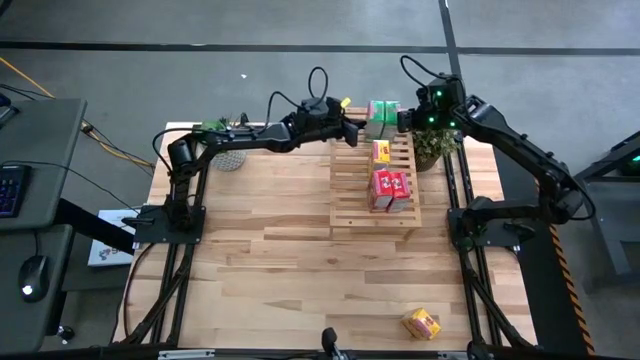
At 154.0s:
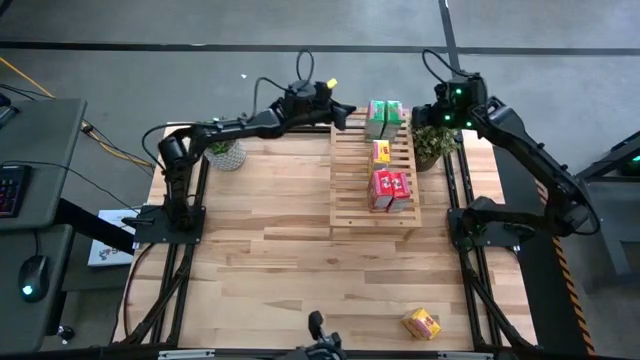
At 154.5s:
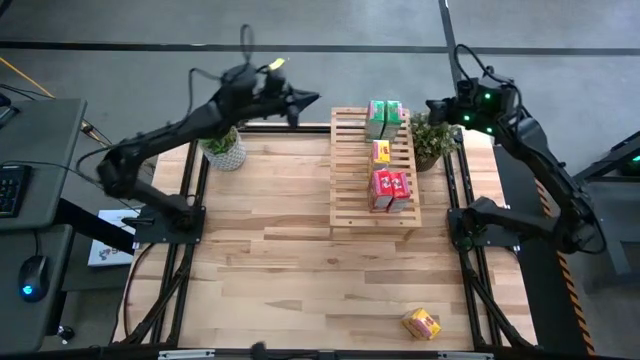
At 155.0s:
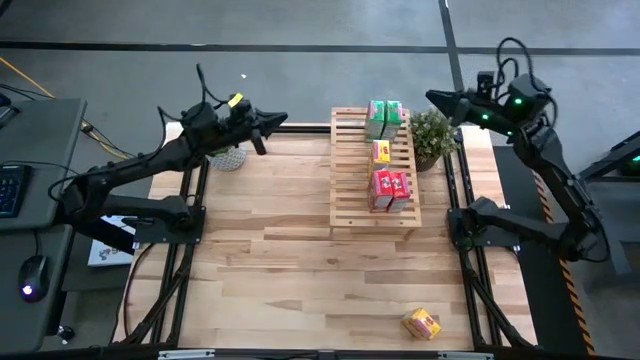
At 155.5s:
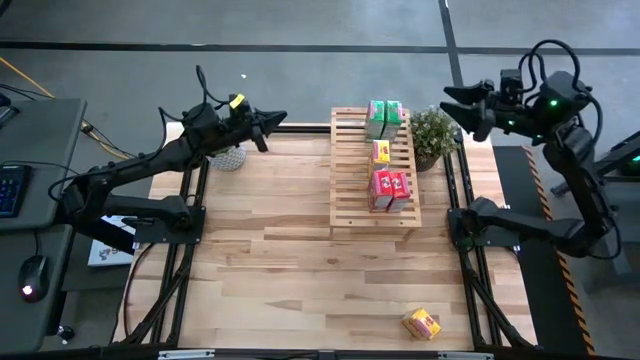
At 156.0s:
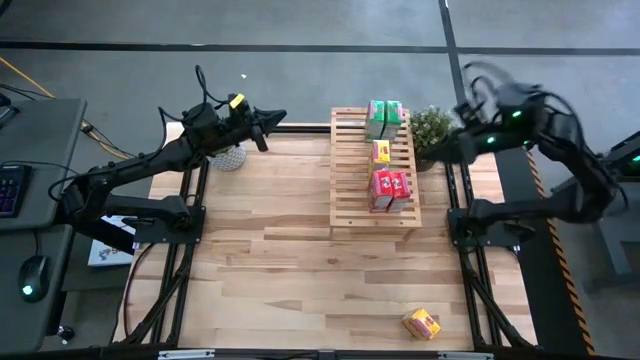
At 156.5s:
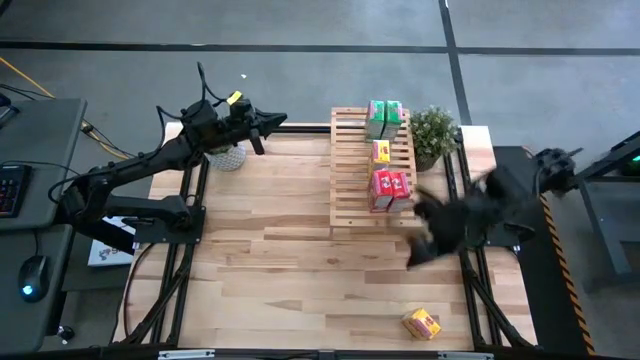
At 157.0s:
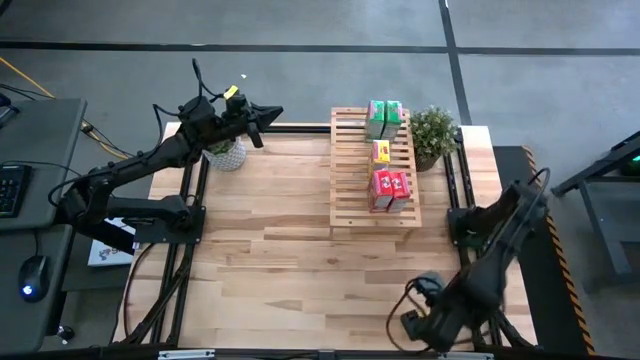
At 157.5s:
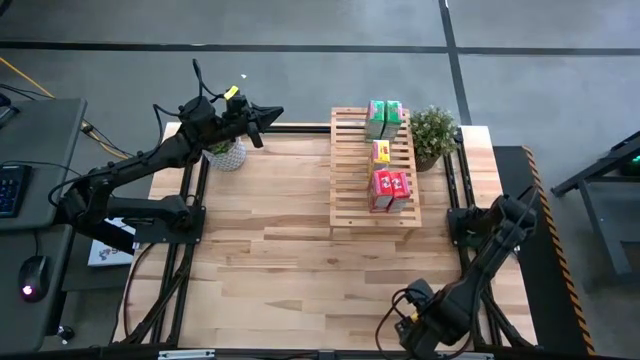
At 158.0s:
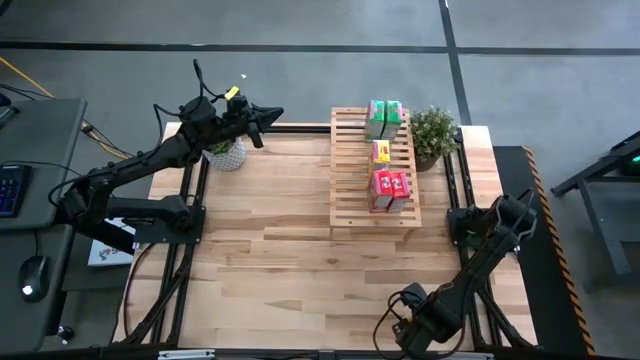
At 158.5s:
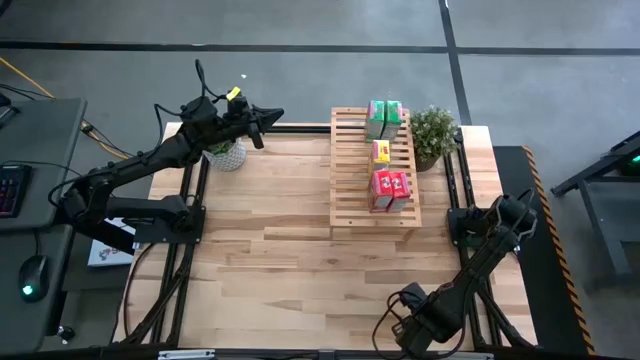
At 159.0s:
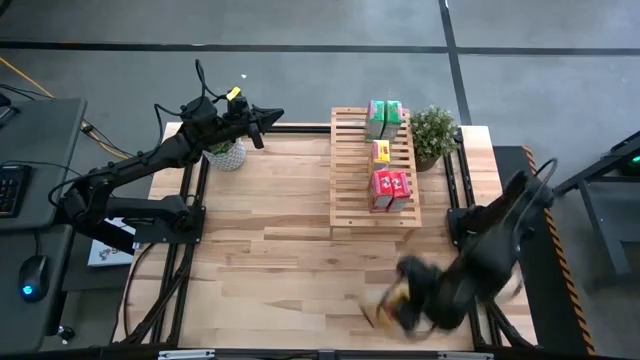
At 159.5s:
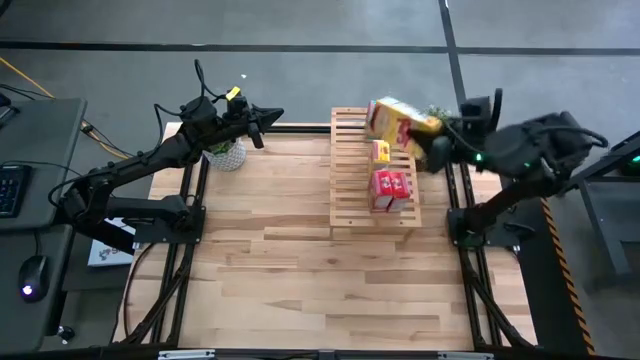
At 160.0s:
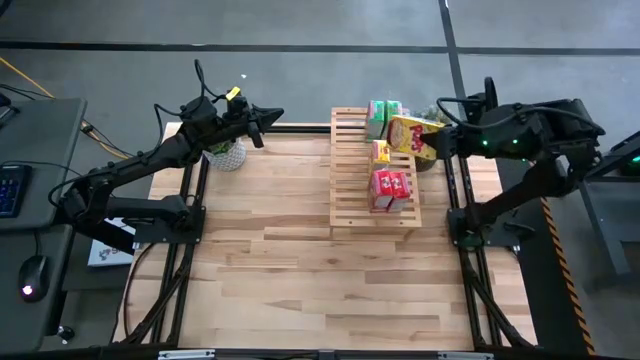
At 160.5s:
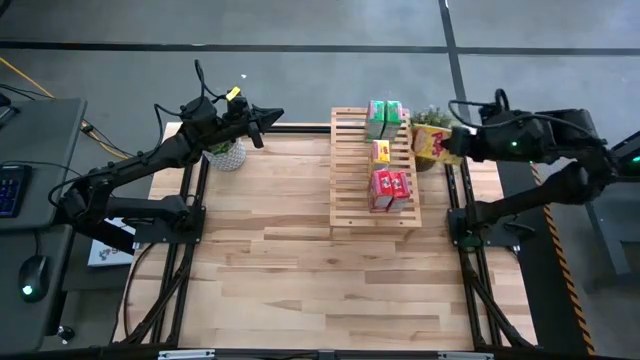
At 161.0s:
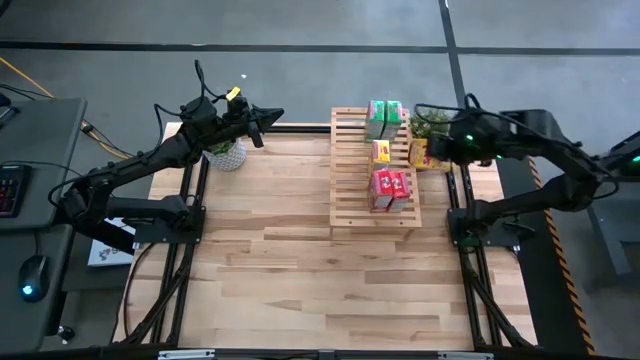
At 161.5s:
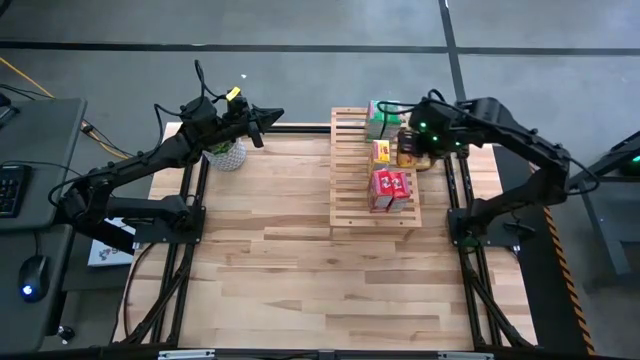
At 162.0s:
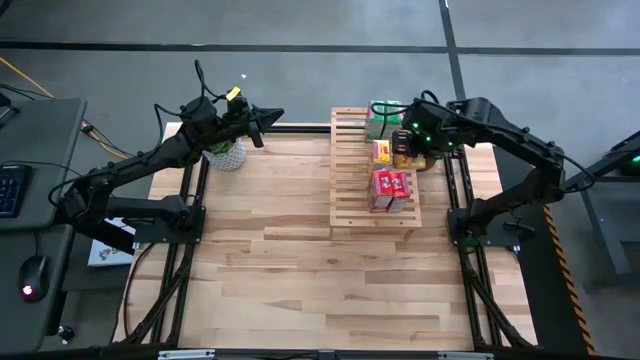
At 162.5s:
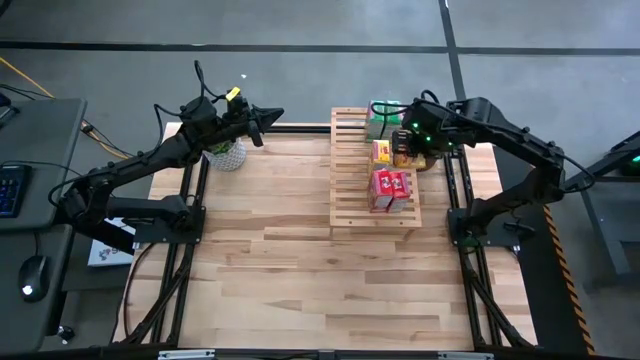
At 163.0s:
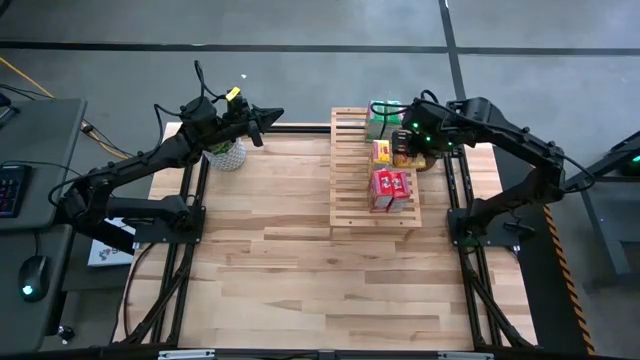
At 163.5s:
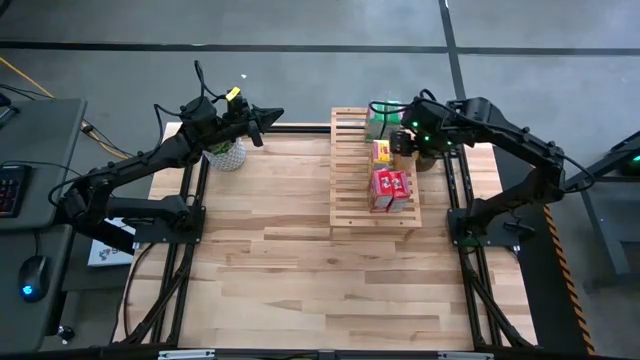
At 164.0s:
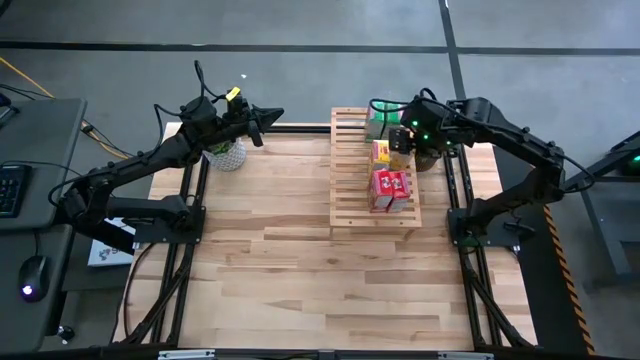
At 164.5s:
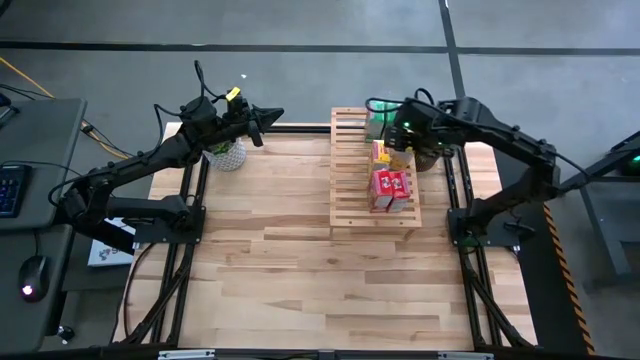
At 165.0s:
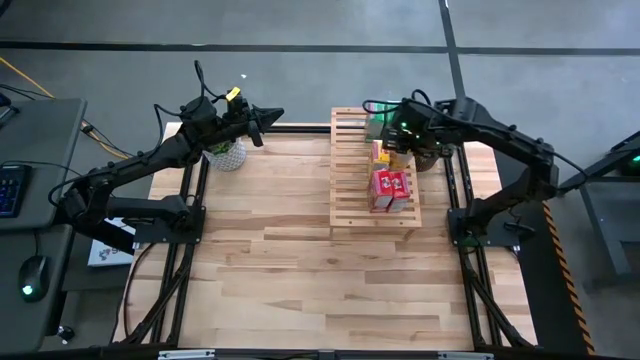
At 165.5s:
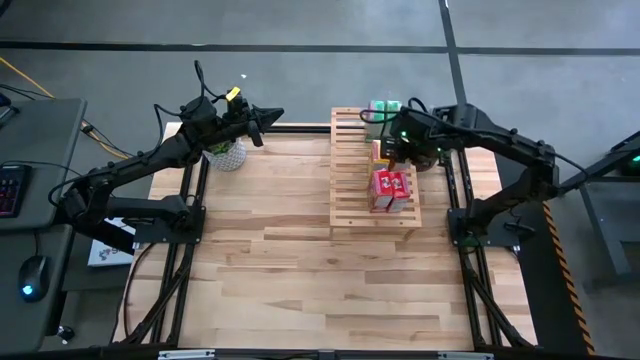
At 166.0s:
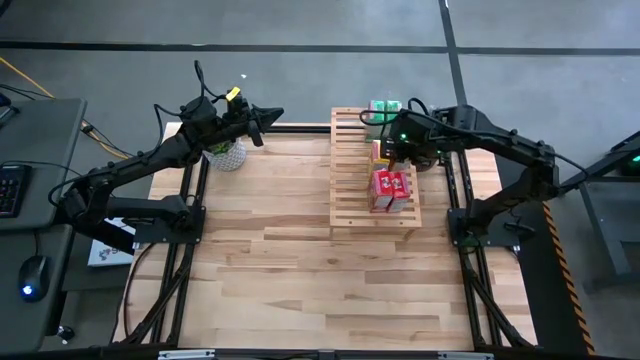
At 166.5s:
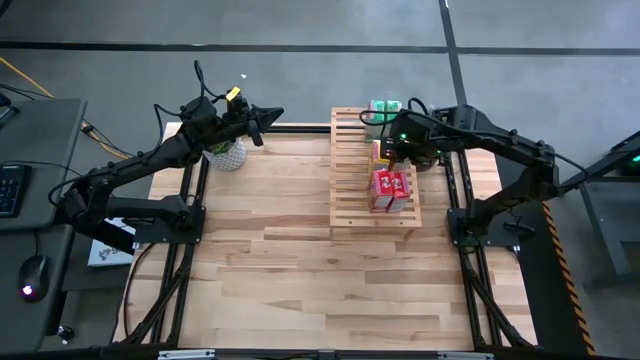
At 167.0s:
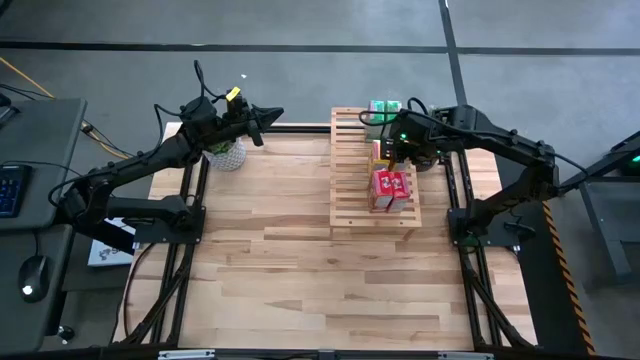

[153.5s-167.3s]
Task: Stack cereal on shelf
Put the yellow cereal box on the shelf

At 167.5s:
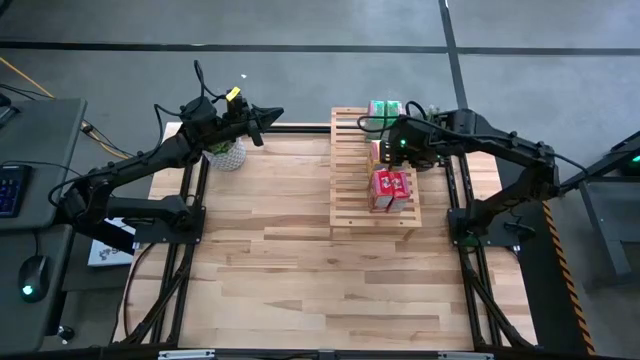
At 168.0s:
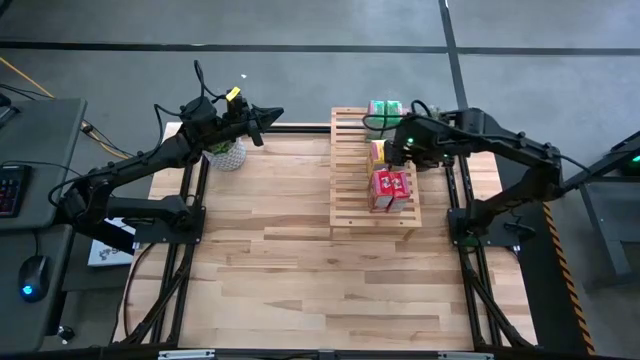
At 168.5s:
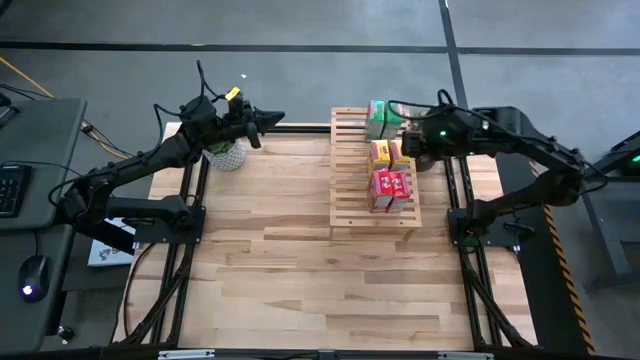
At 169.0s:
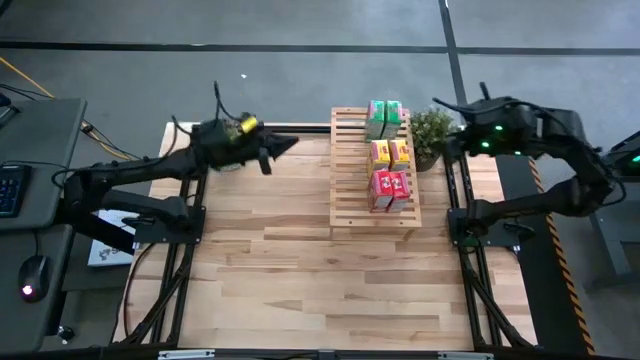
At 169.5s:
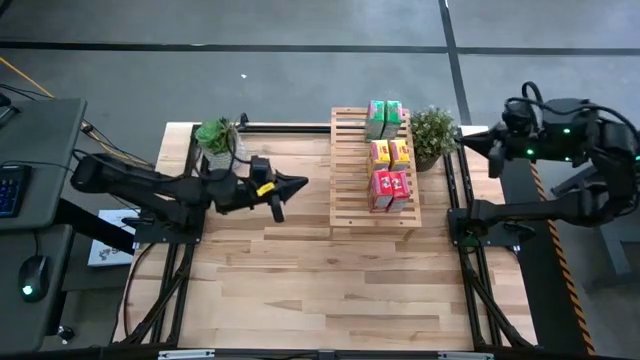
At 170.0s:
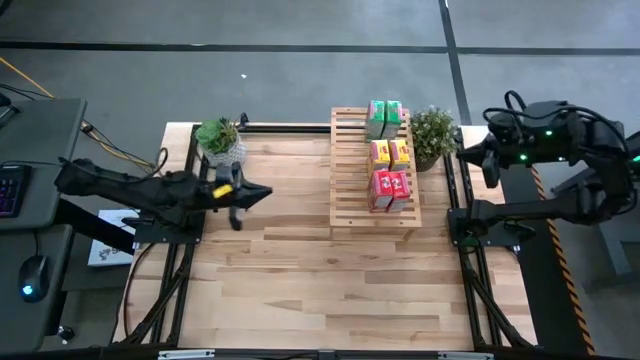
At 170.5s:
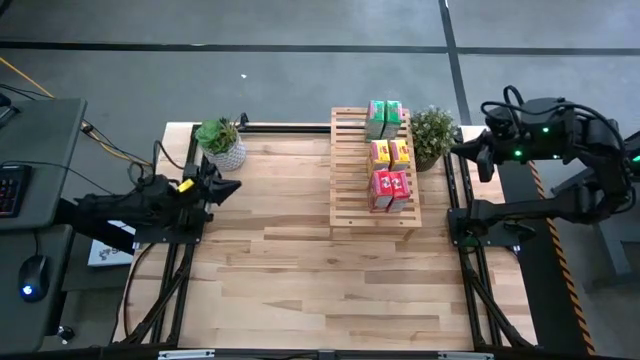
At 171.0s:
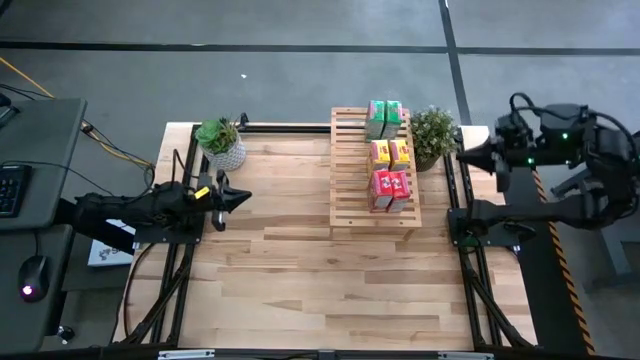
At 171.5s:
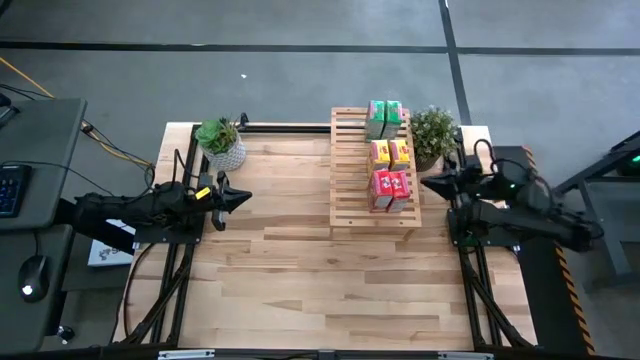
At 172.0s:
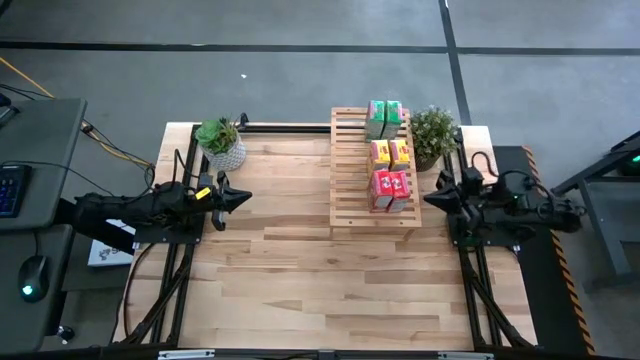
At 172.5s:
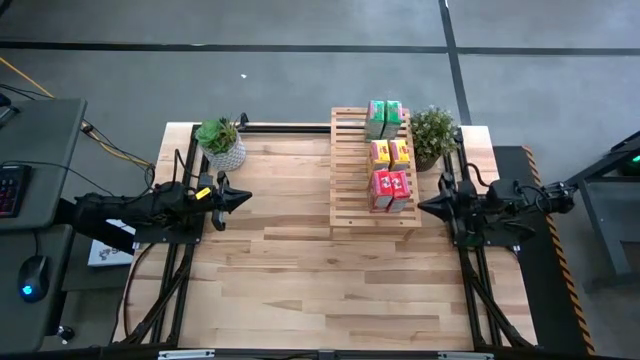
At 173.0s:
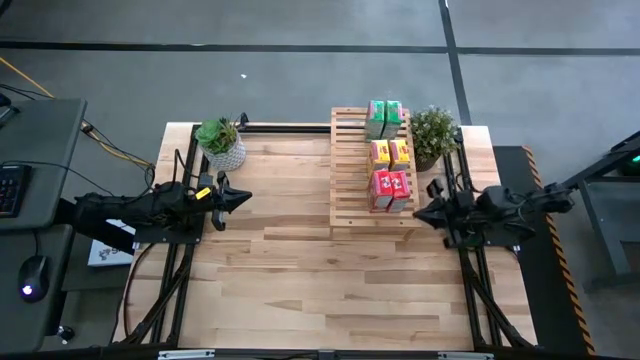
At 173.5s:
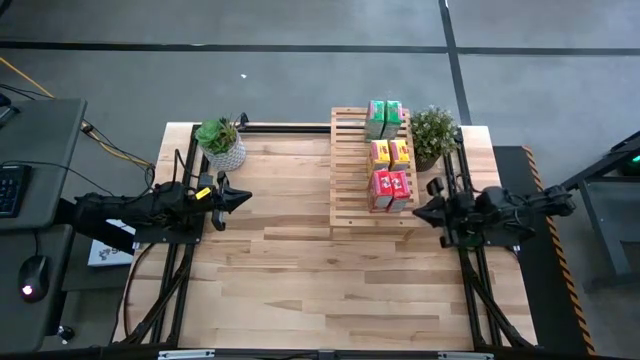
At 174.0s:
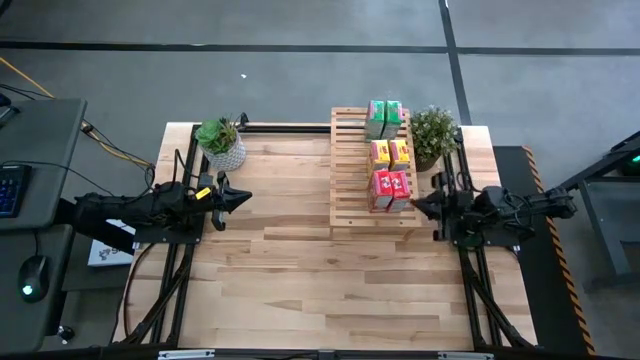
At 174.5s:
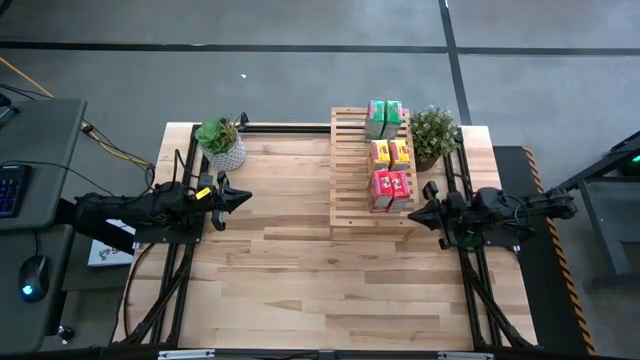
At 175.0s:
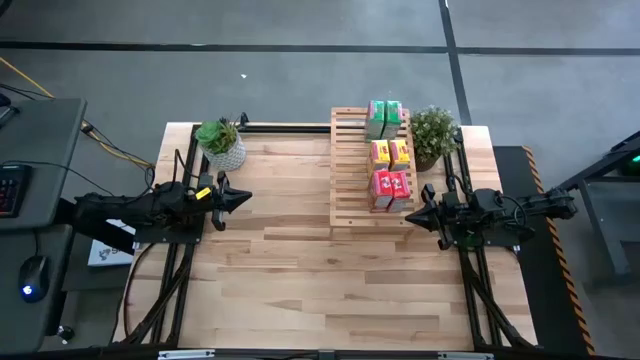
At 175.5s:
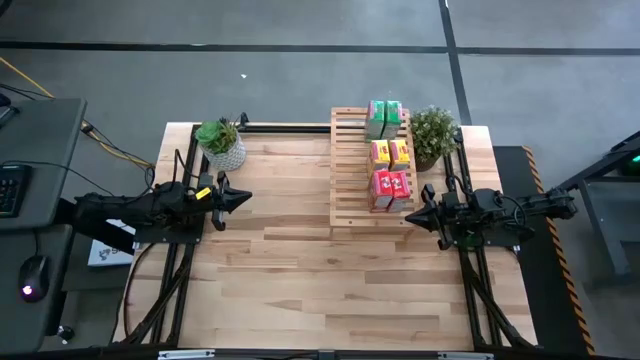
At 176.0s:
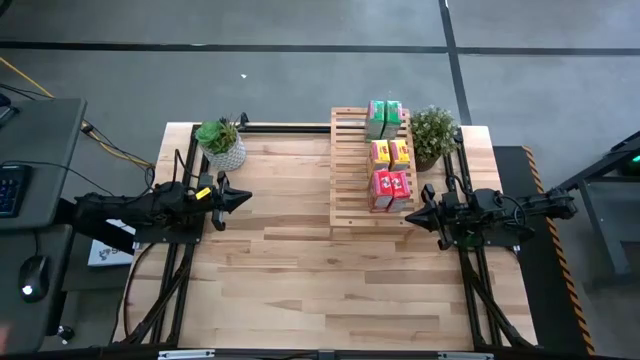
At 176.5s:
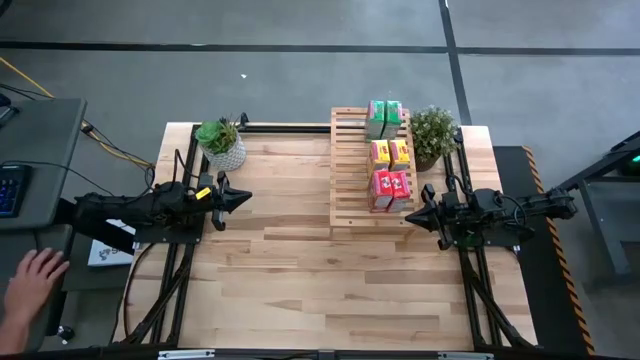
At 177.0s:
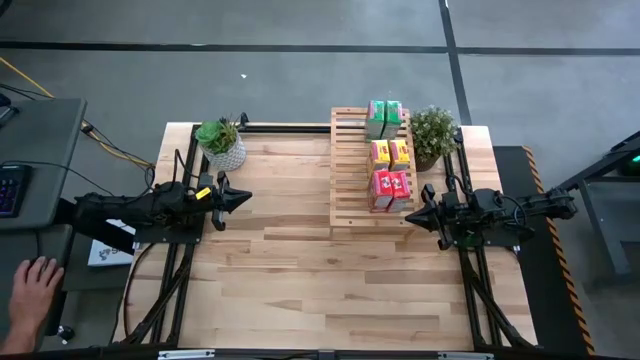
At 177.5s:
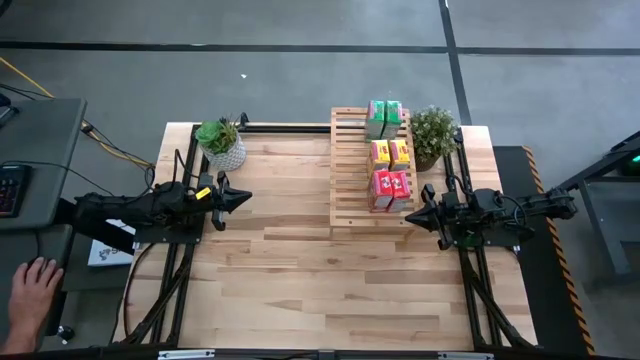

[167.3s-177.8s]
Return to Home Position
